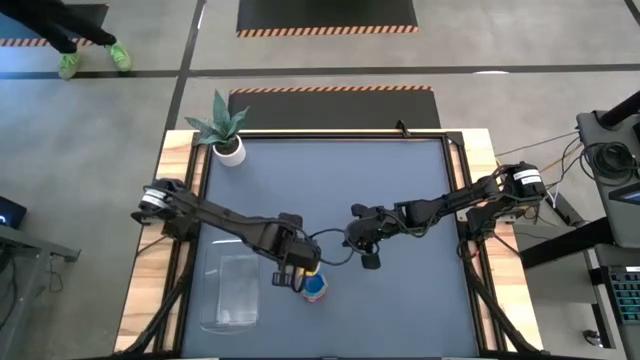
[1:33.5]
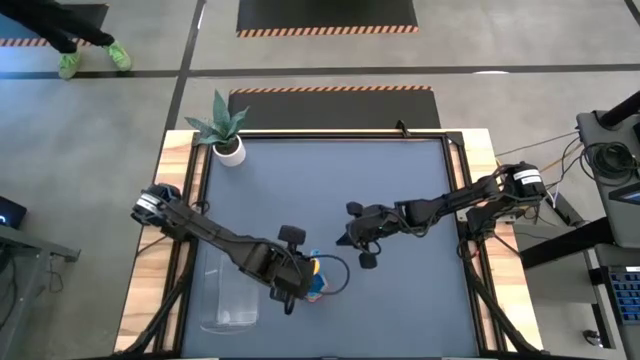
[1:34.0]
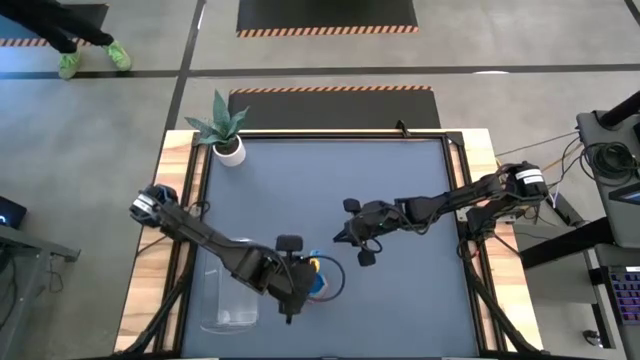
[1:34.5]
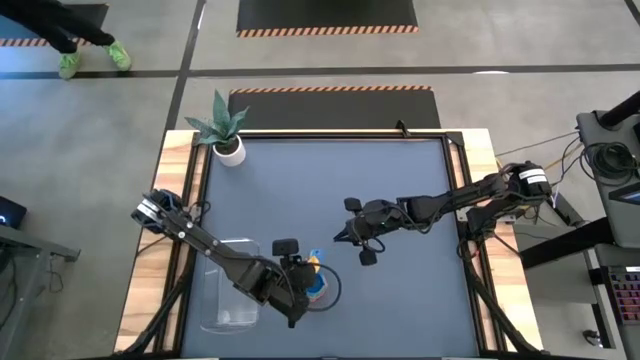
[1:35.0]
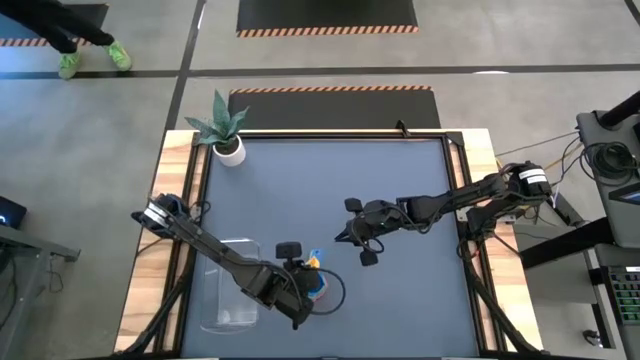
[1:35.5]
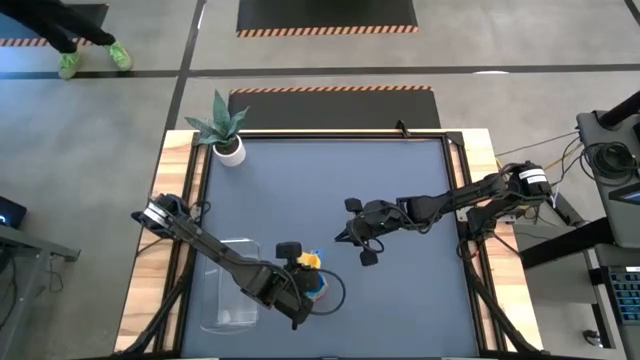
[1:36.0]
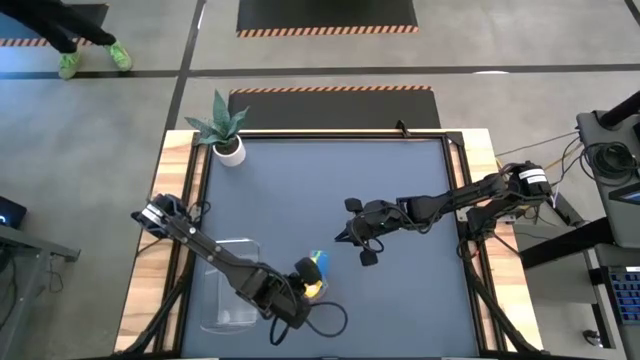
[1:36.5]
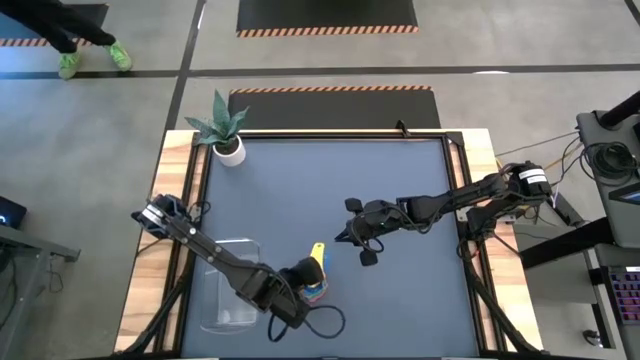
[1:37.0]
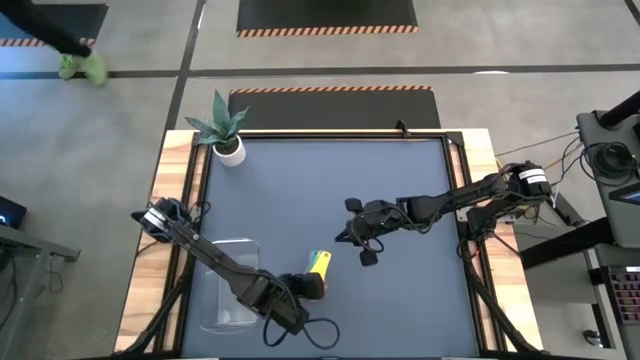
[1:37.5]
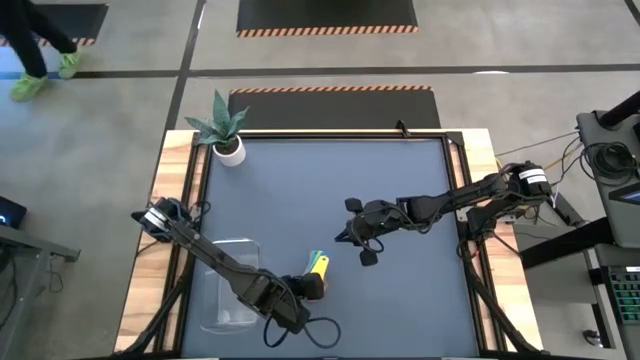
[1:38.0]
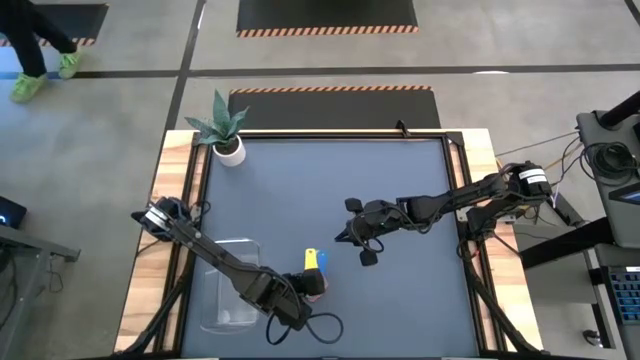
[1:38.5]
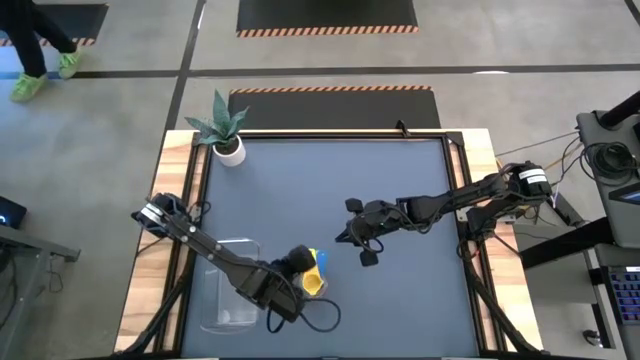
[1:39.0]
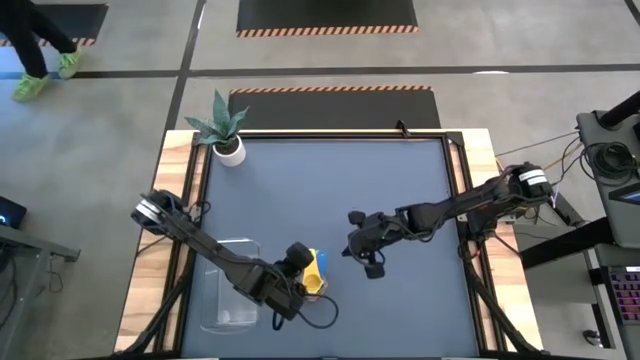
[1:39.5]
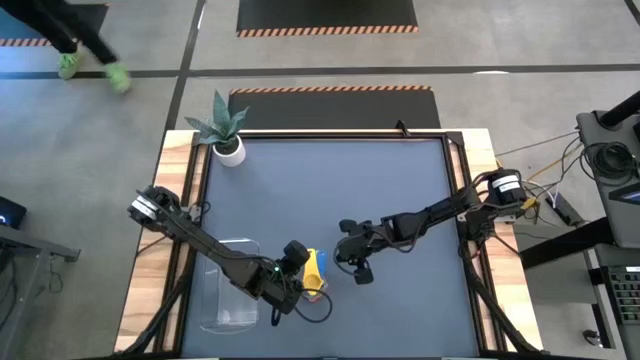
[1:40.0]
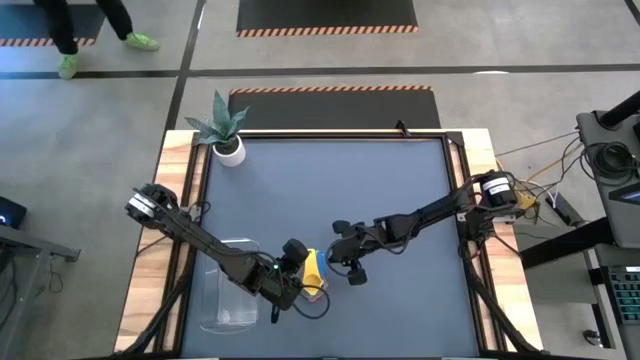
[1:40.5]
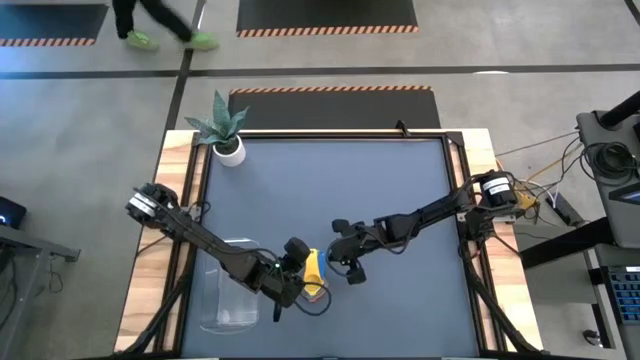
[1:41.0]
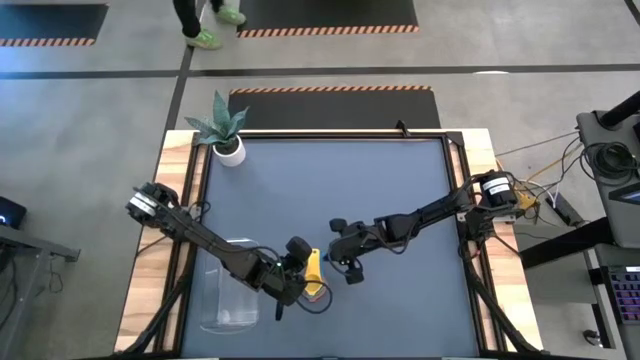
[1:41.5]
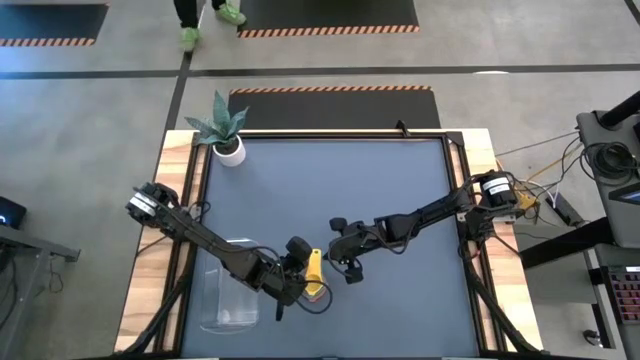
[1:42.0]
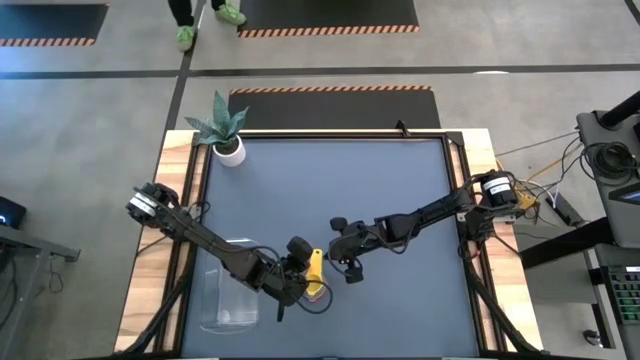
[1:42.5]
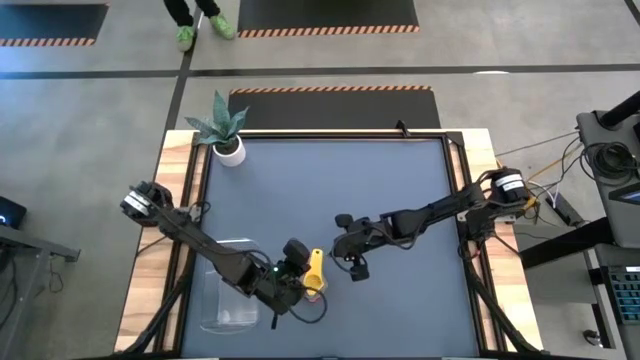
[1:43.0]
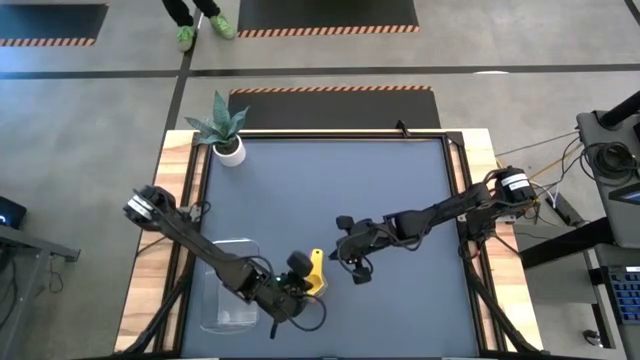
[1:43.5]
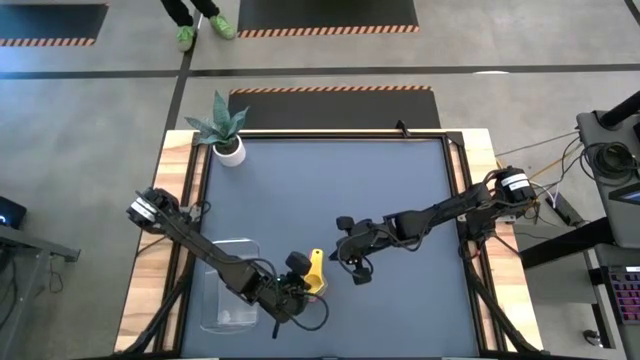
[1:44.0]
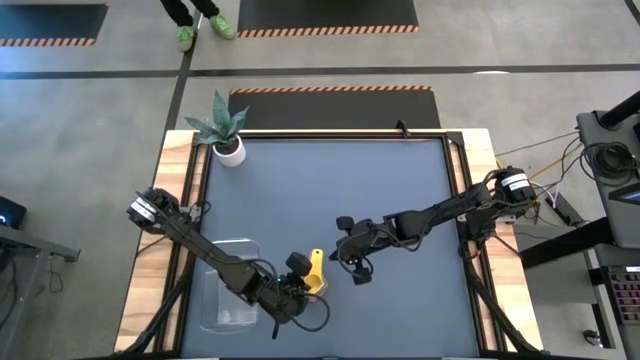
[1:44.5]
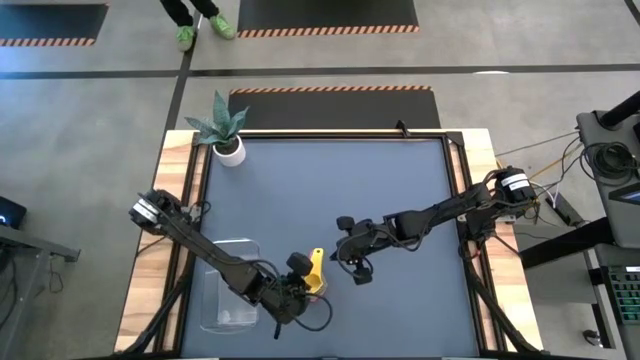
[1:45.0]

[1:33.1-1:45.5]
Task: Nest measuring cups in basket
Stack the yellow measuring cup on top of the blue measuring cup

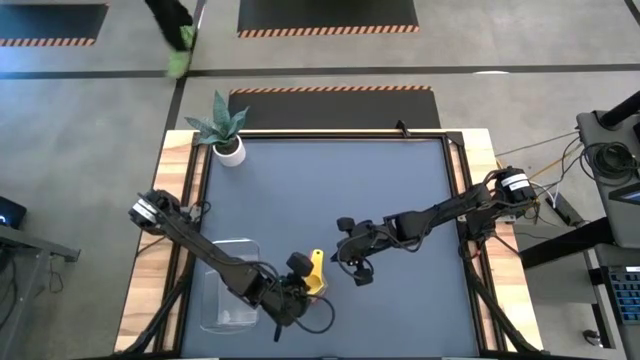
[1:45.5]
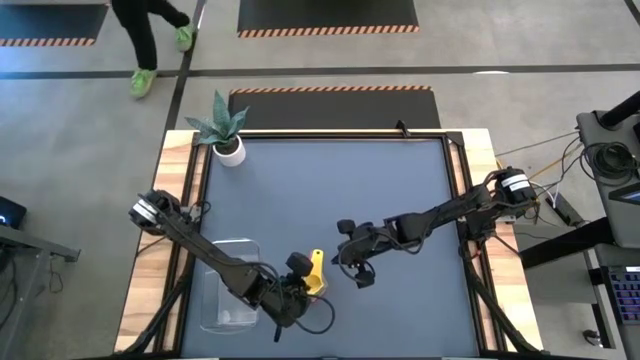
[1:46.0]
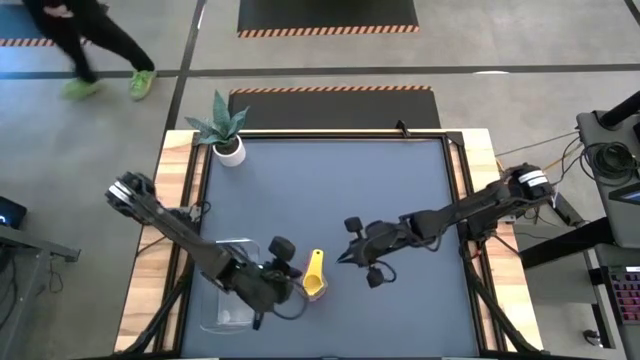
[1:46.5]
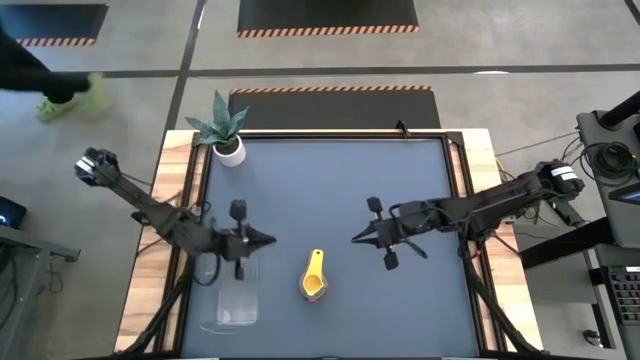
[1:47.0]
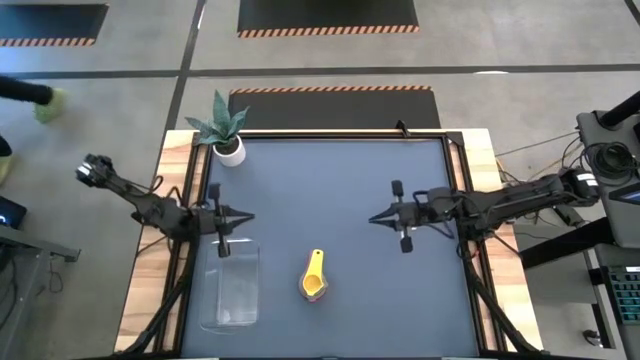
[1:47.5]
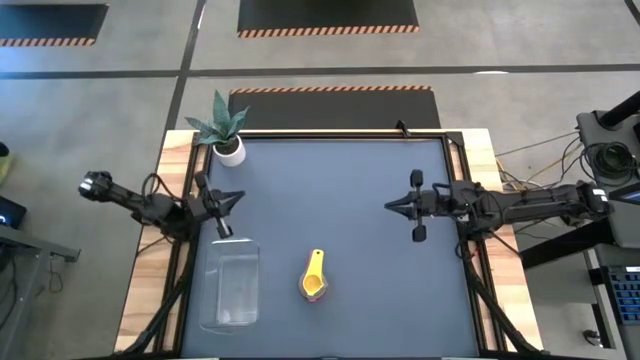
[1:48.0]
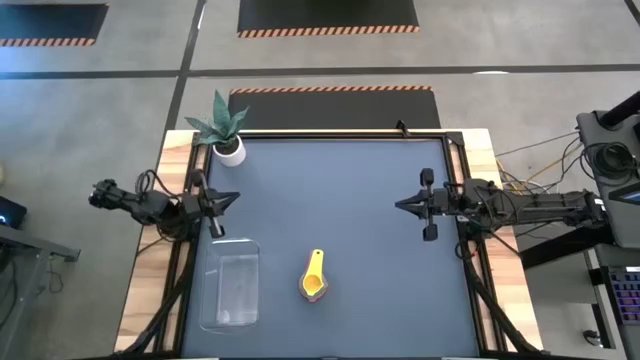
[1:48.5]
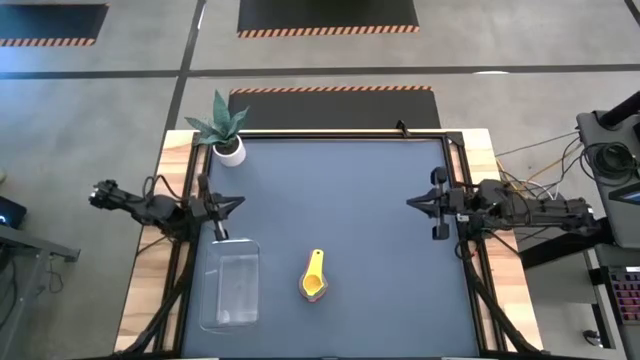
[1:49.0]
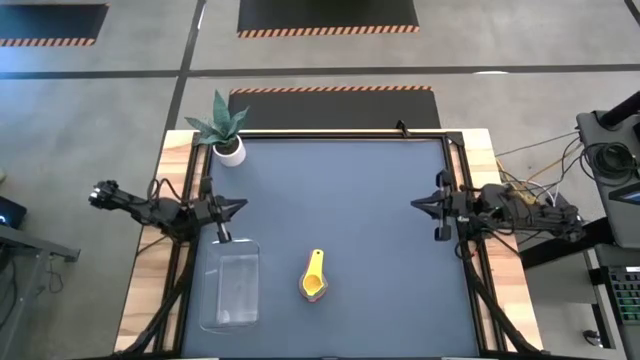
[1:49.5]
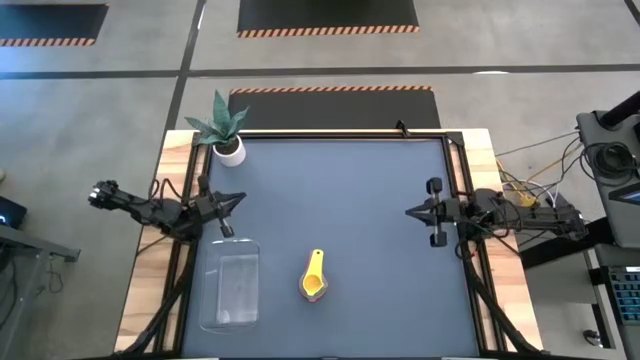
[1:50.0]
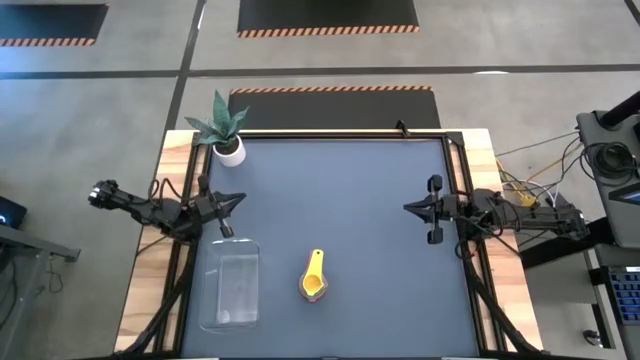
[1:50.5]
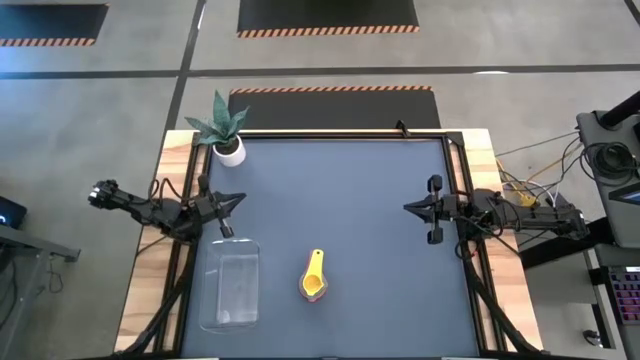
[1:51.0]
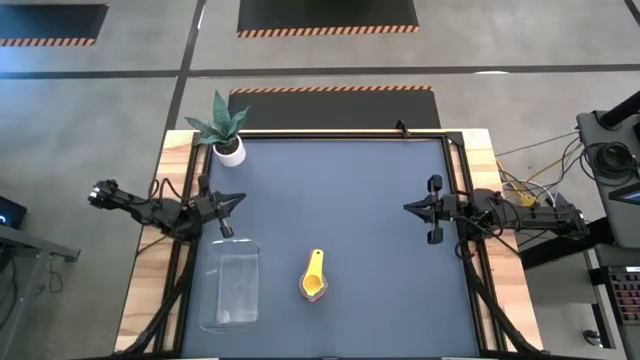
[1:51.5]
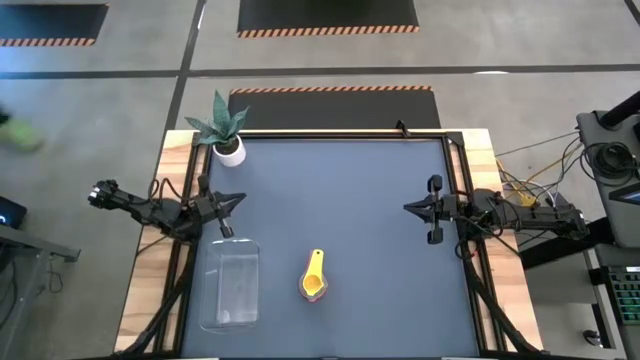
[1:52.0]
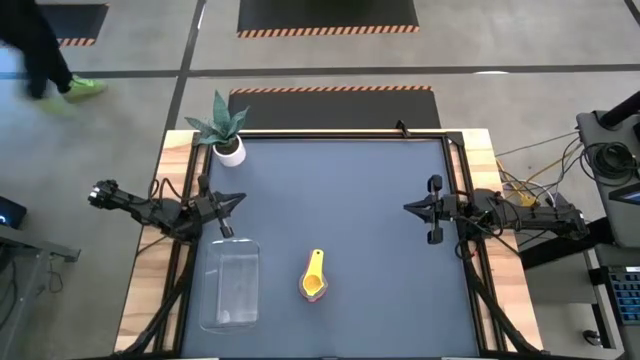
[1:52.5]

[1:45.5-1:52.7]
Return to Home Position
